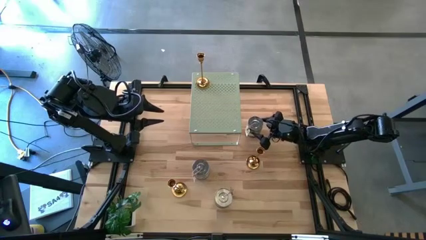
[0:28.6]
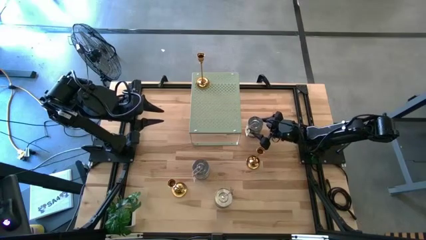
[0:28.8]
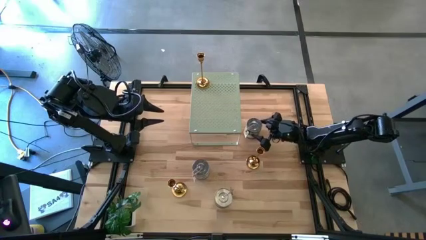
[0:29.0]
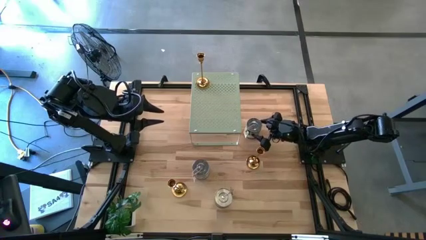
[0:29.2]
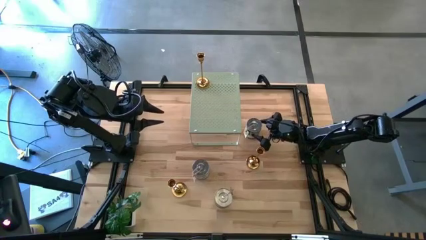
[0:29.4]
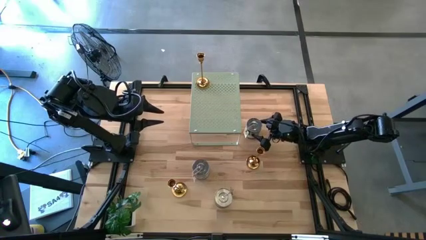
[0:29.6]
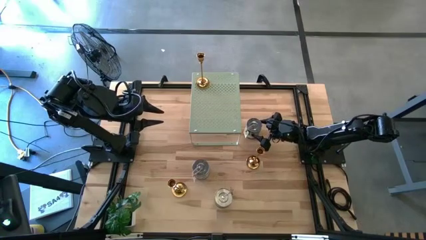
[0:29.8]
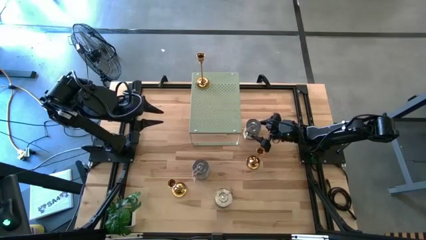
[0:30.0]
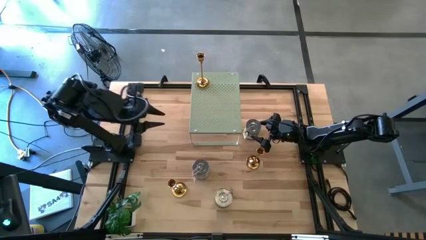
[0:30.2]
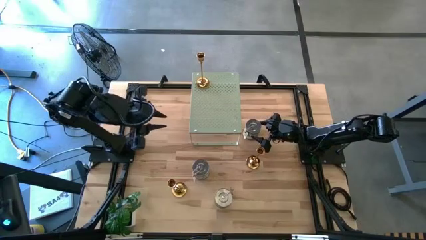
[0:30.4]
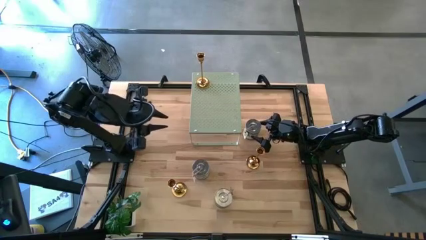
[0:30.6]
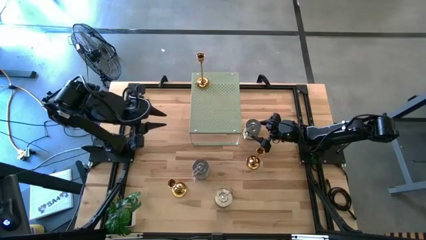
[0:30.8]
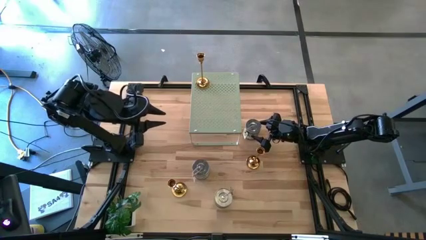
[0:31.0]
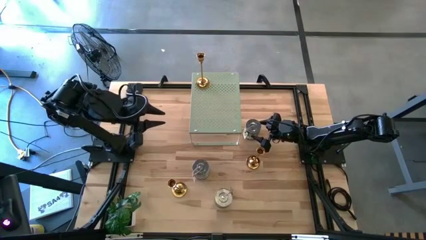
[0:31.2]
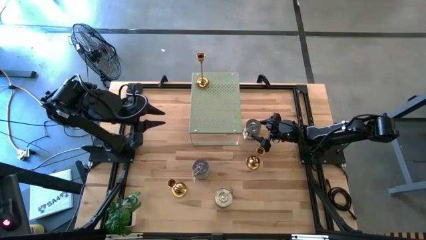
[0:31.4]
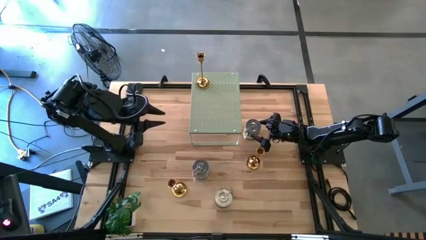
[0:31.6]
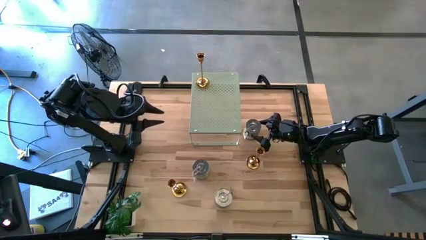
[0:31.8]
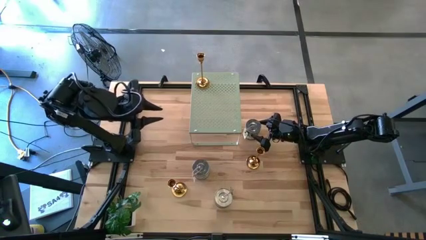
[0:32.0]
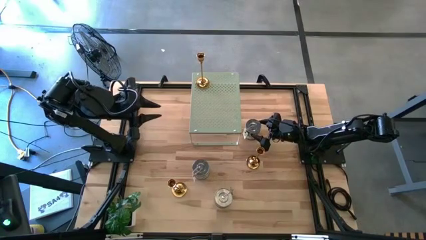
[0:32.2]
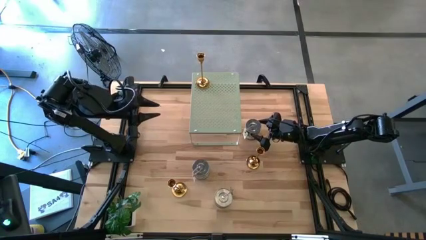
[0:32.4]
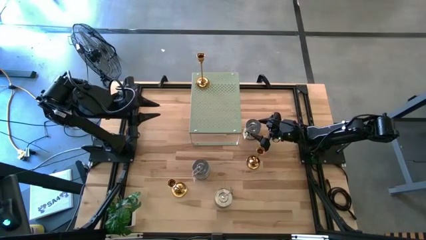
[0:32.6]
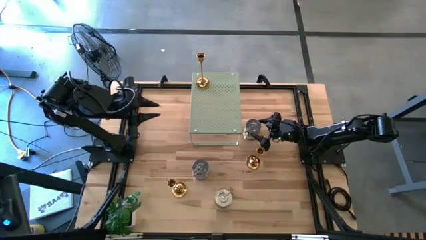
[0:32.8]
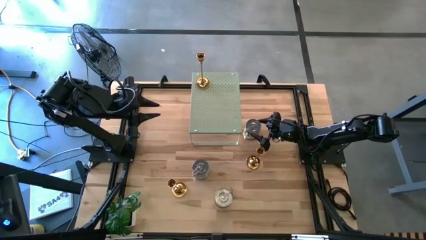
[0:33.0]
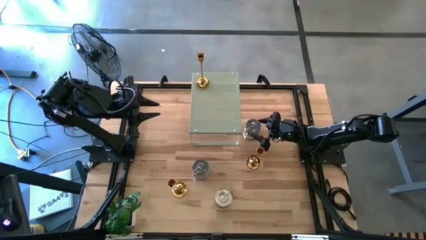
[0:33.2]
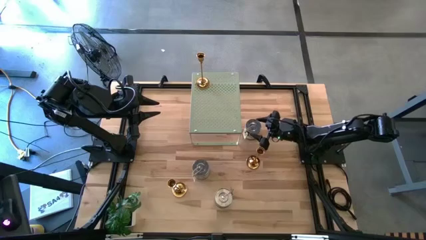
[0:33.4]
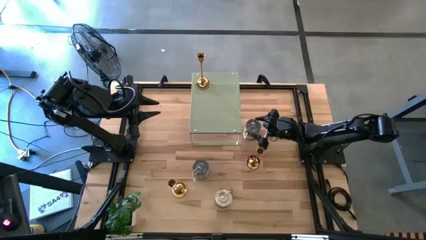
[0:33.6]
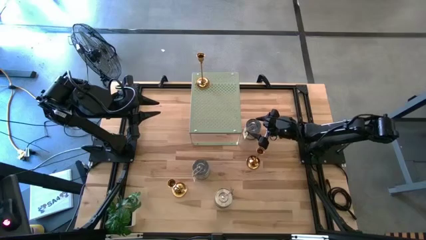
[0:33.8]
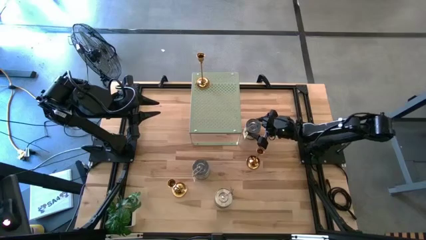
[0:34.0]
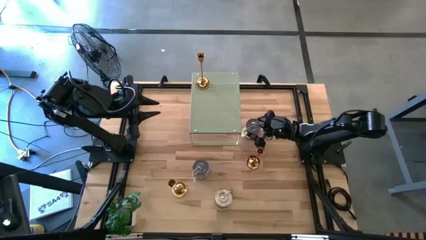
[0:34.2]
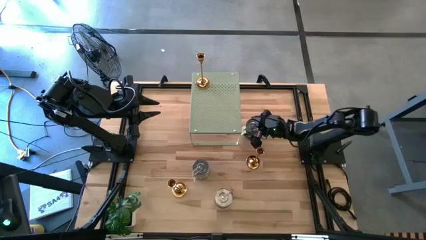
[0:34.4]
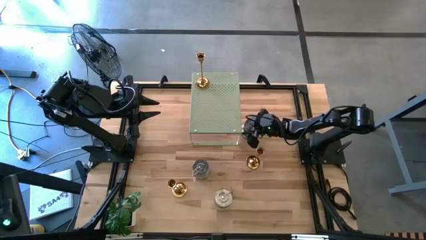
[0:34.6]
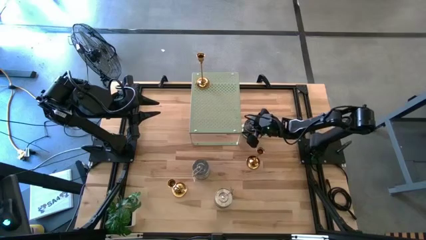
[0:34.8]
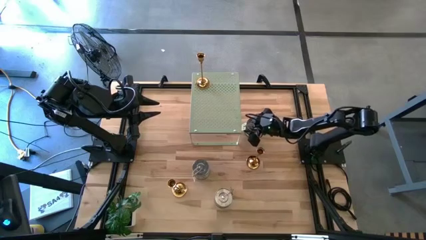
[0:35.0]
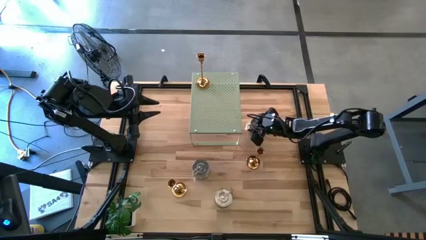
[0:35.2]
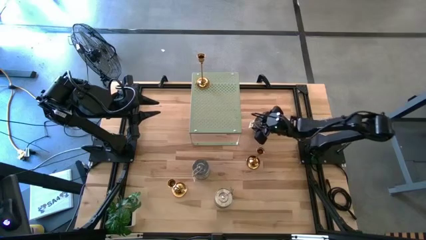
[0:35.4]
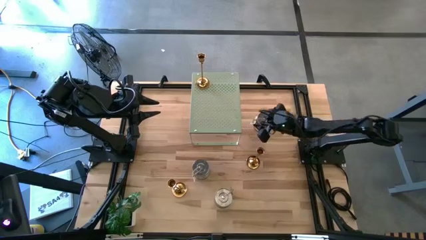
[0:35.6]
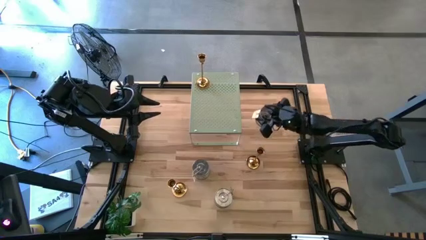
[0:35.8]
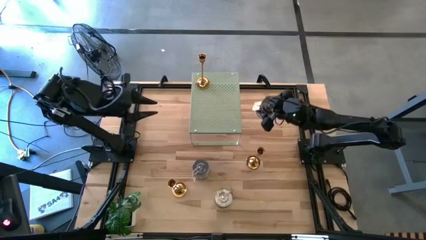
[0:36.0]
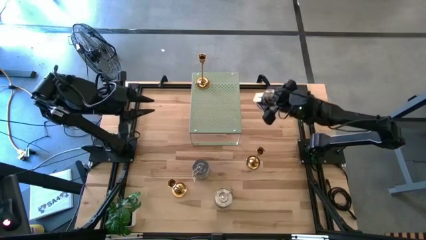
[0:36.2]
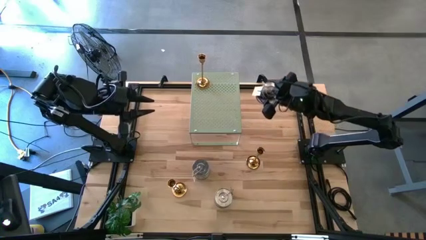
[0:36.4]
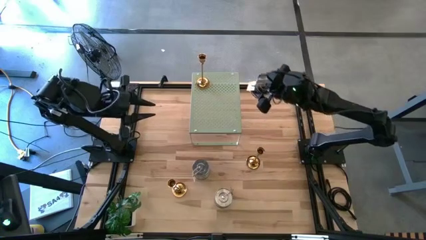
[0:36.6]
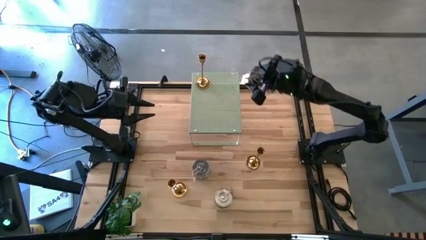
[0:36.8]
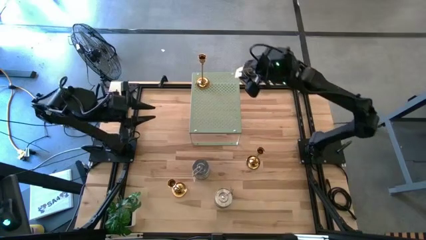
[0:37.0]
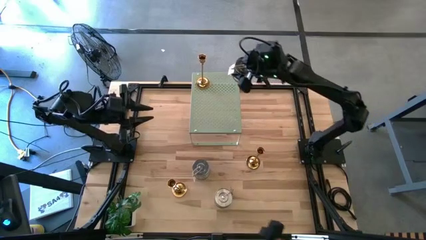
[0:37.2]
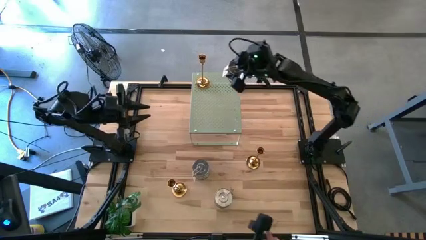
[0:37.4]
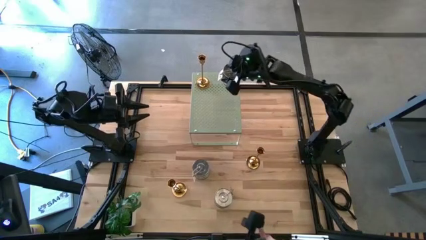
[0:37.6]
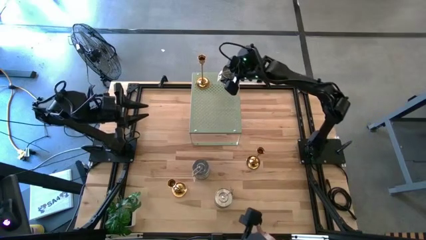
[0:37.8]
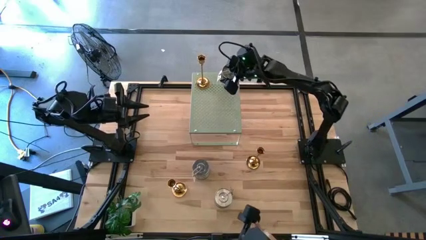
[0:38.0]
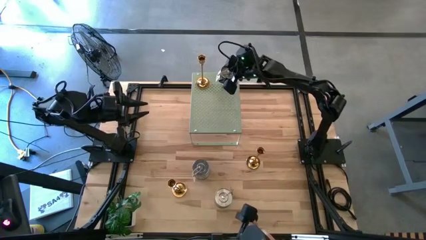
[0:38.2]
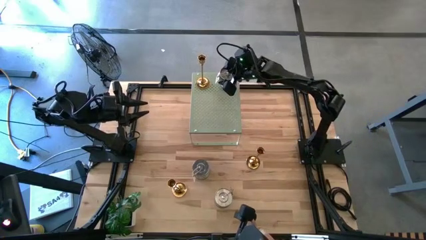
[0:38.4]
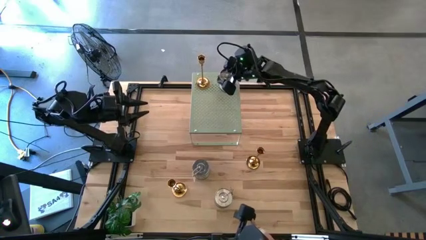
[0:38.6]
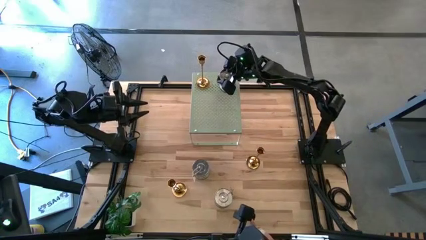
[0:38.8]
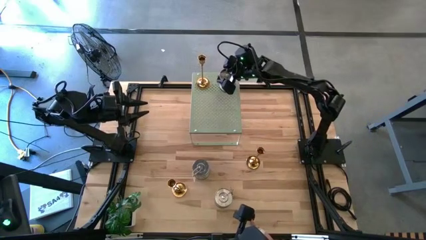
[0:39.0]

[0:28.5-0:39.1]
Task: Pick & Place candle stick holders
Put the top green scented candle on the shelf

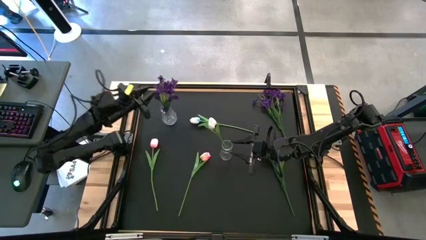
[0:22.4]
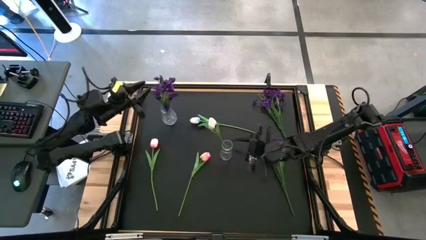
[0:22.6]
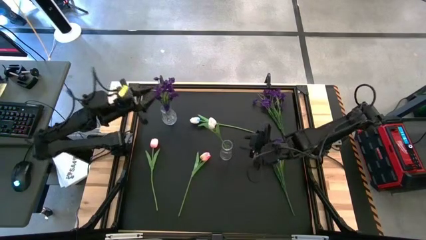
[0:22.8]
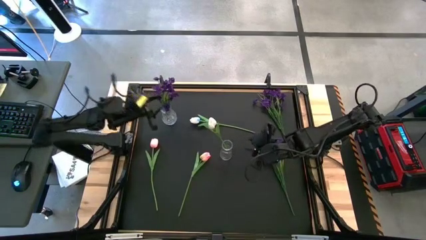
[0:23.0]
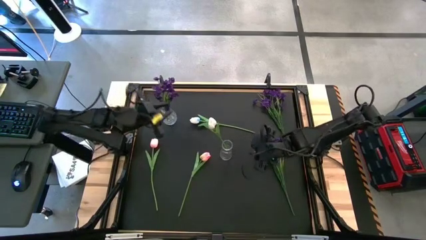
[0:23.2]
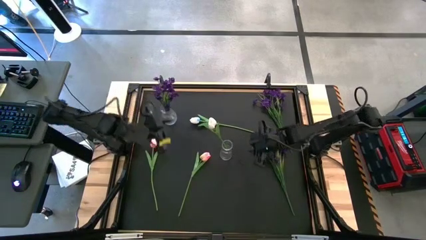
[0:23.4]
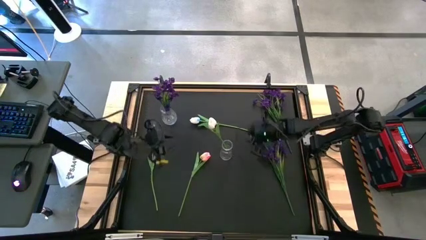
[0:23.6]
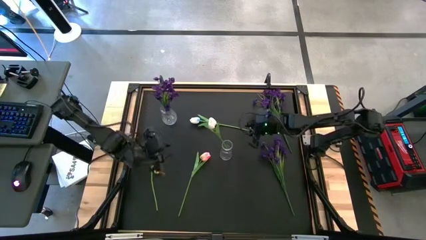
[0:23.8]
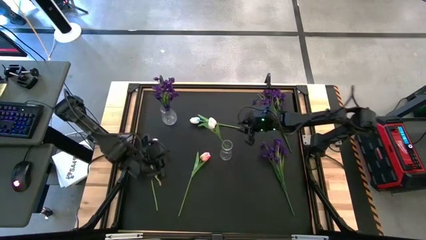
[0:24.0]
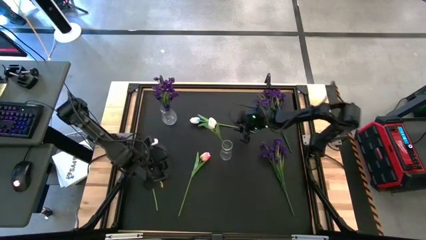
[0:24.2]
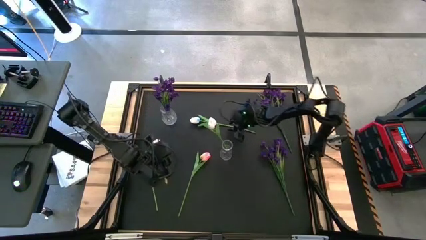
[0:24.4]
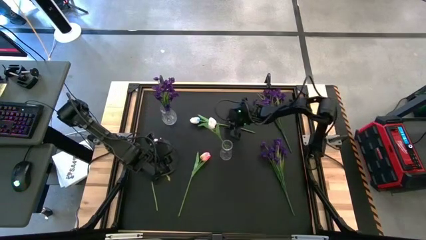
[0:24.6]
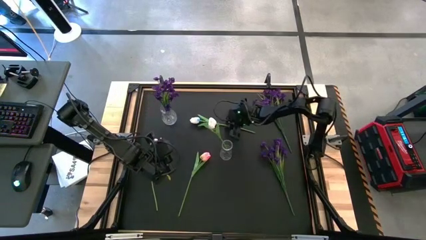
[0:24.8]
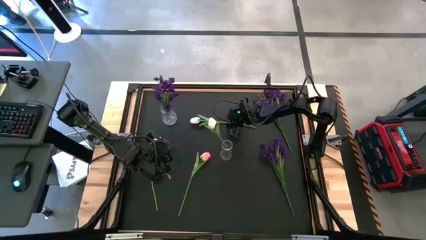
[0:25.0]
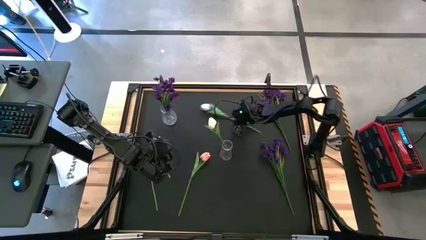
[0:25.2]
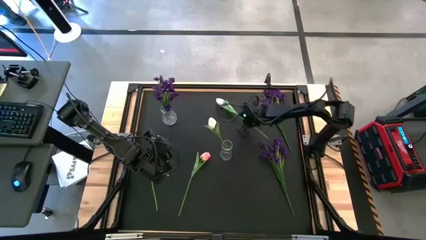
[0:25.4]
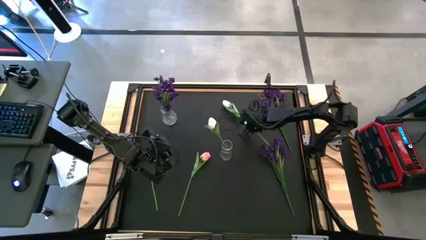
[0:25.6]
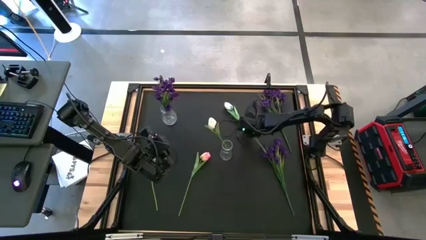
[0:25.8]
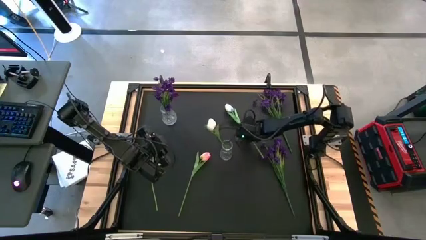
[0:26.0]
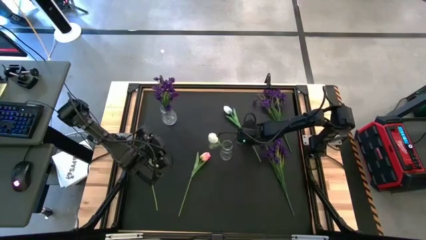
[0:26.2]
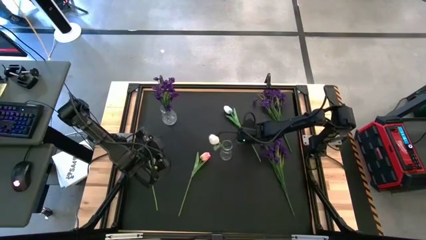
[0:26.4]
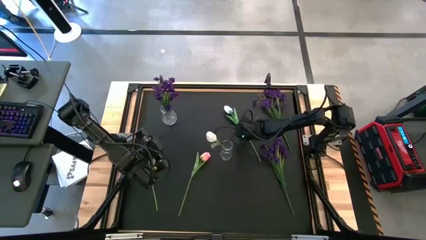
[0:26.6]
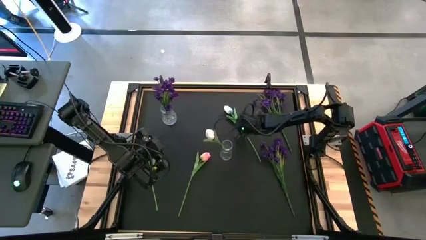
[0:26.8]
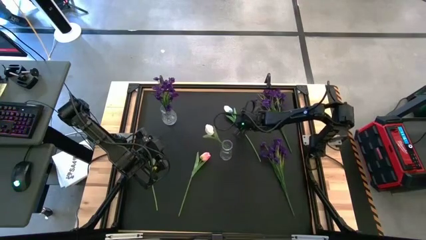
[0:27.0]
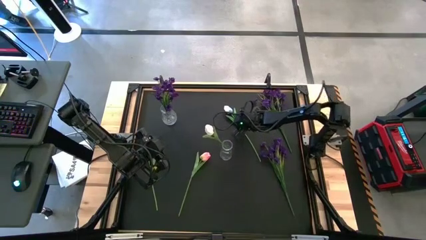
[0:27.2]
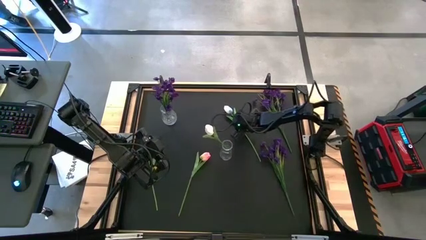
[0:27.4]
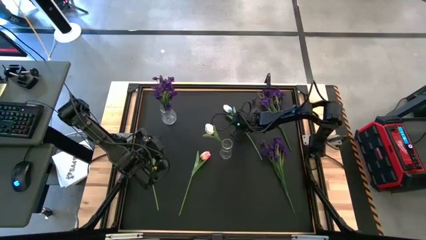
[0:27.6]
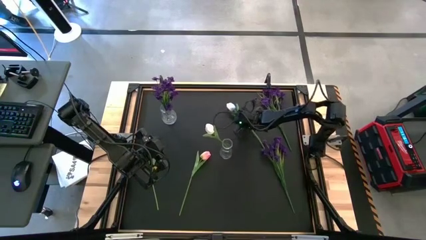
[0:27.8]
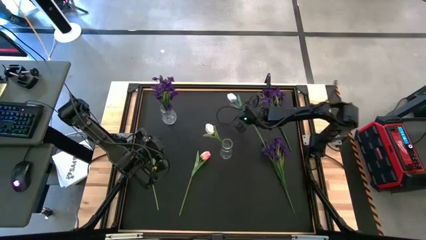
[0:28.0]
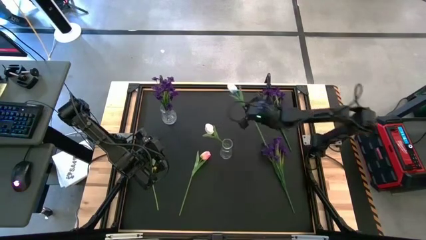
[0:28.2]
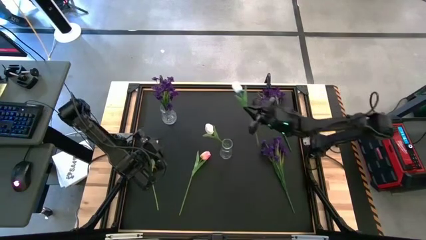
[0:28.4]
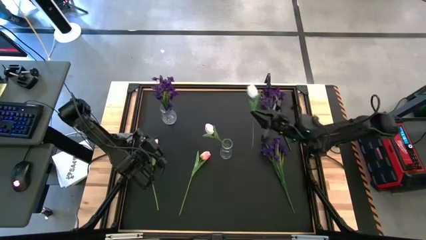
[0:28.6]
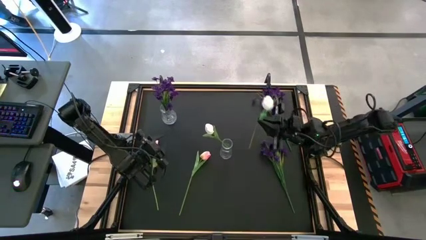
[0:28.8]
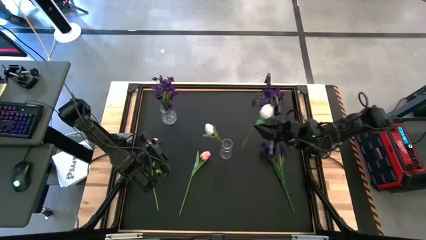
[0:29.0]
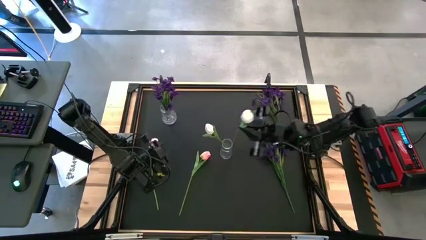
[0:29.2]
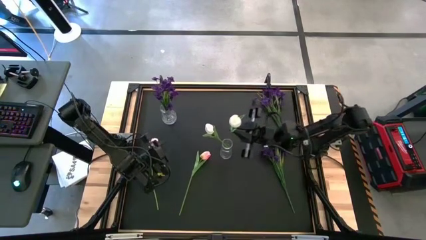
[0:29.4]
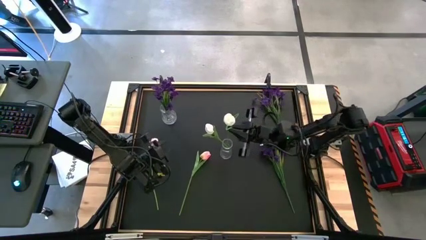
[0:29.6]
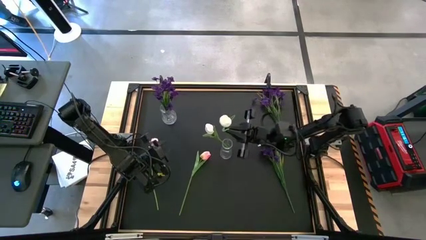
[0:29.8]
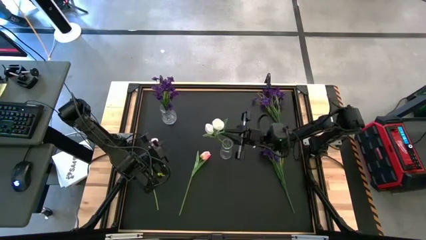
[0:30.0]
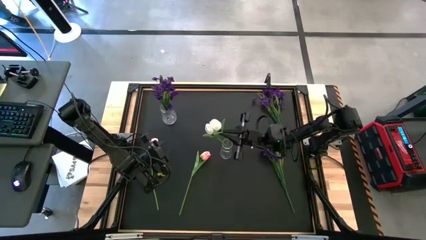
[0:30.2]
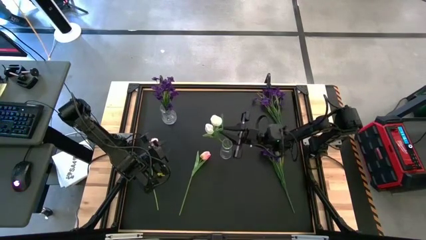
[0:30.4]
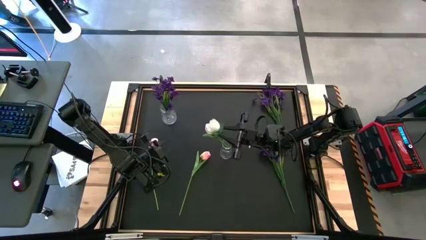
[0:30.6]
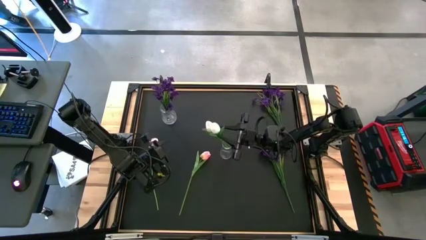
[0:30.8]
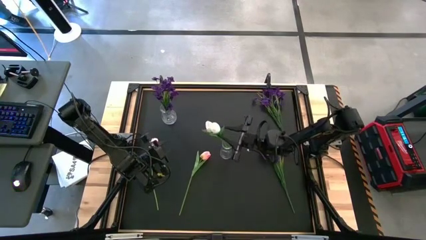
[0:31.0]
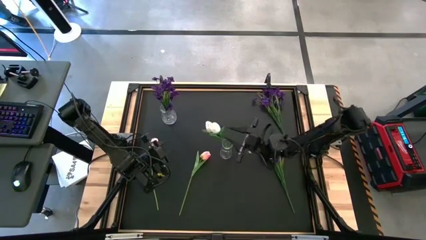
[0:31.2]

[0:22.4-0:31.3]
Task: Sort flowers into vase by color
Put the white tulip into the right transparent flower vase
